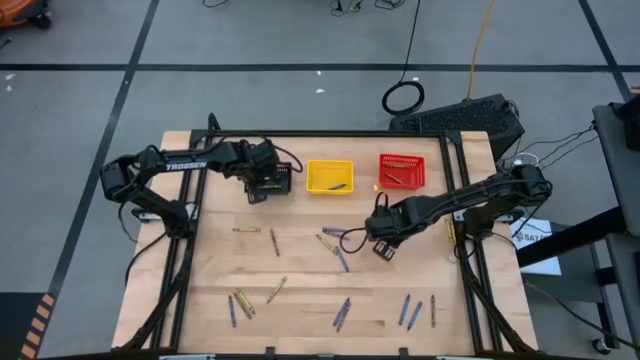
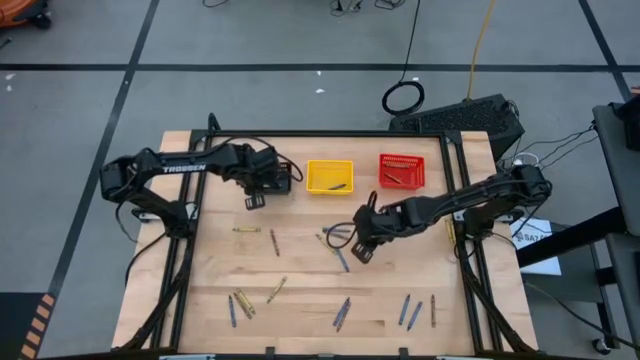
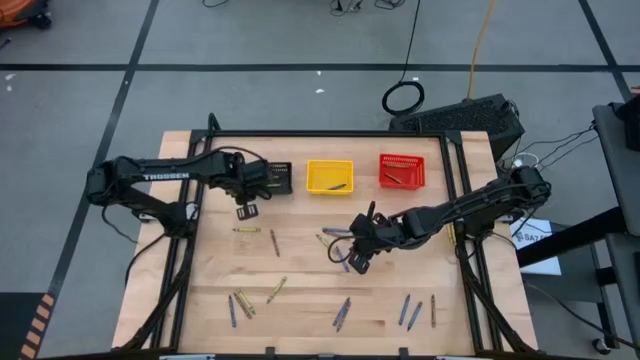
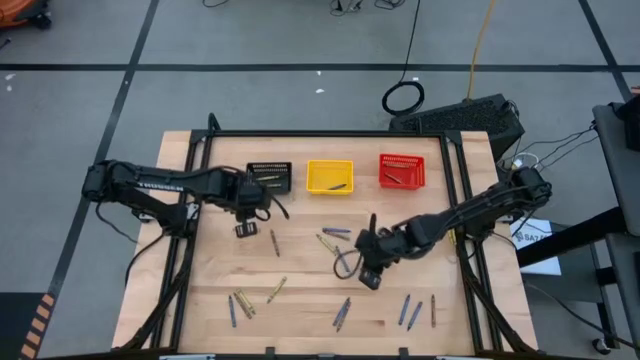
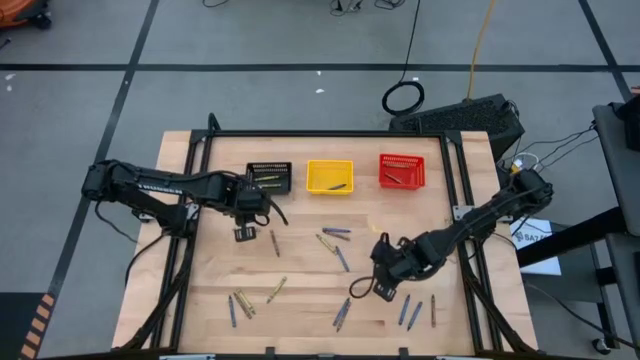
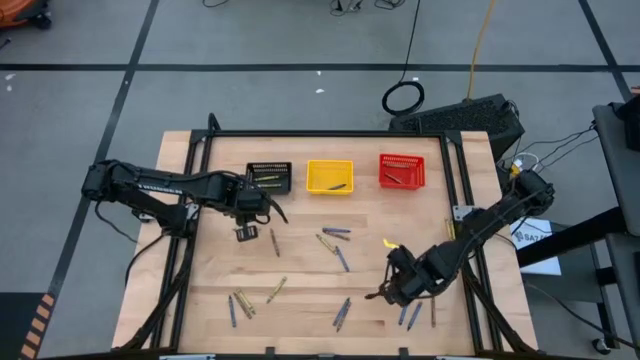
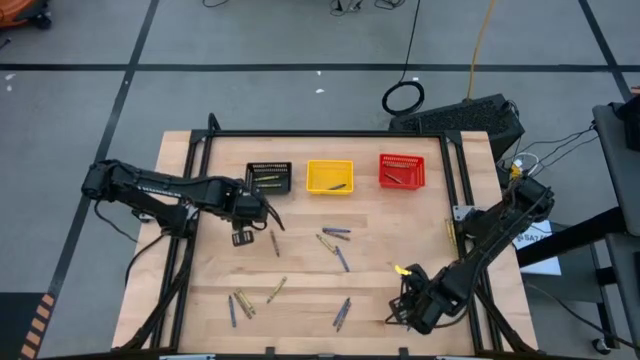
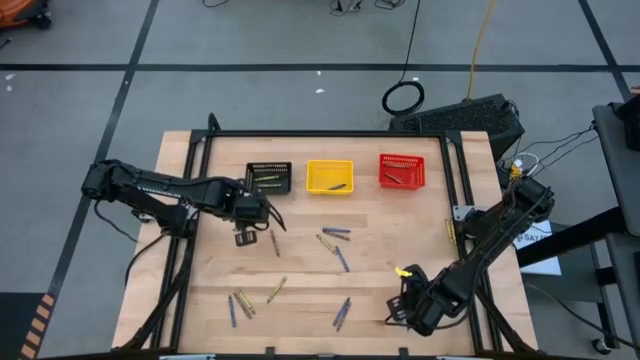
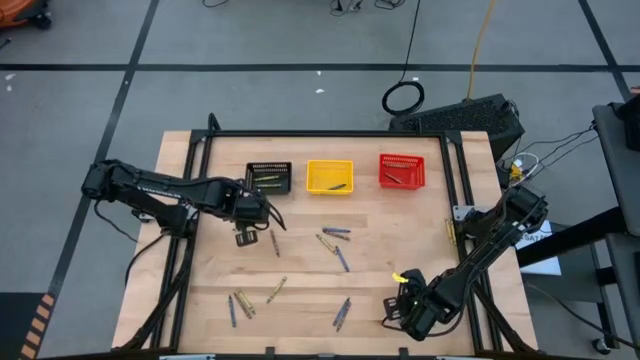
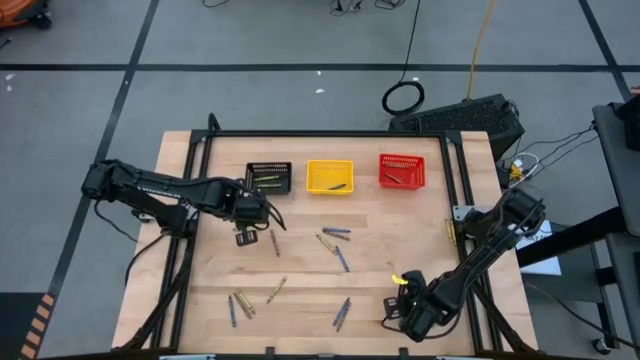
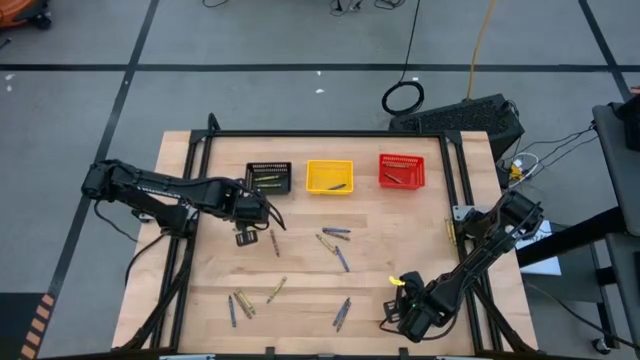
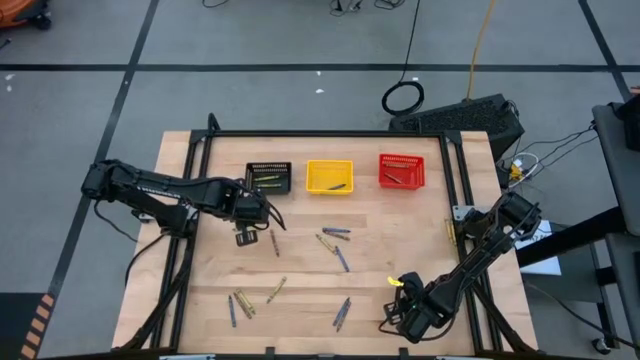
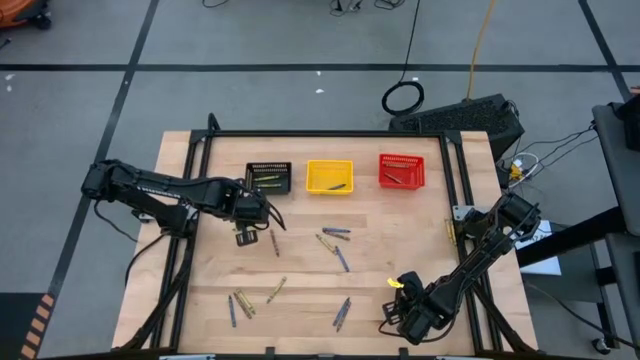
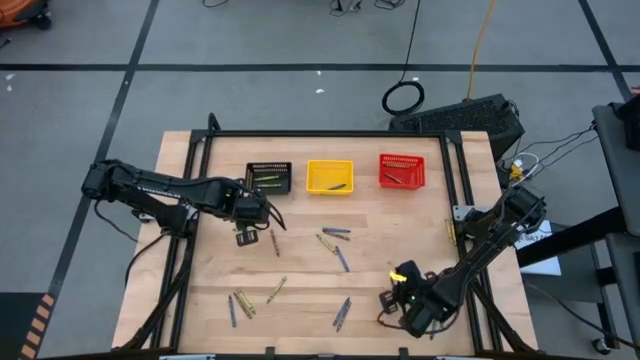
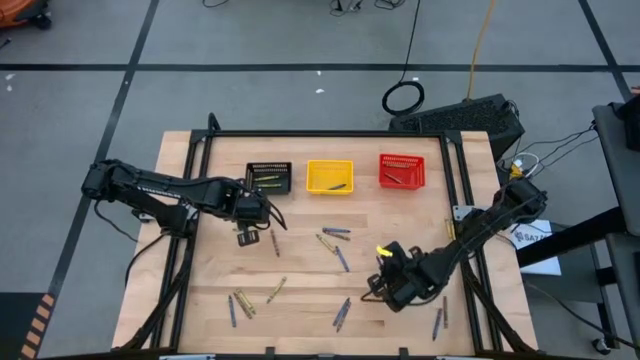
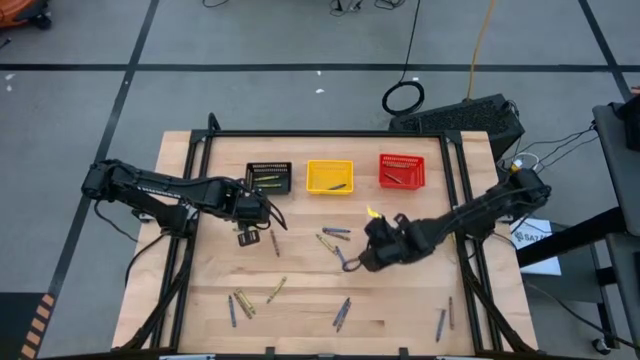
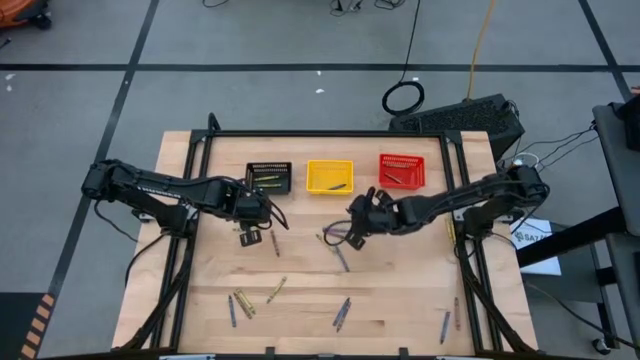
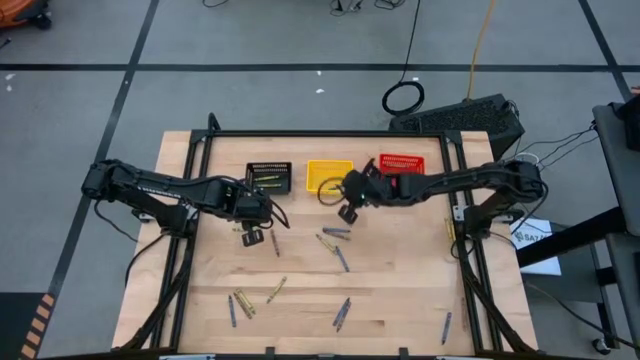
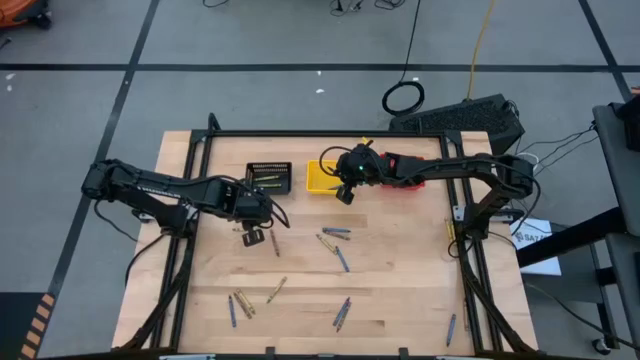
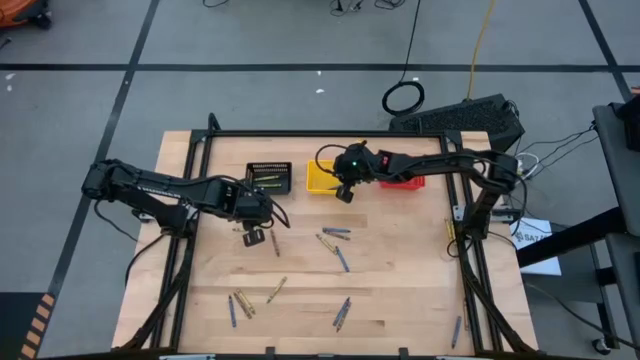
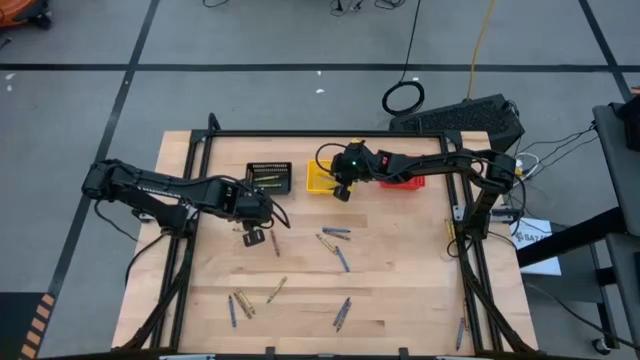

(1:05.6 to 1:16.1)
Task: Sort crayons
Put the blue crayon into the yellow bin

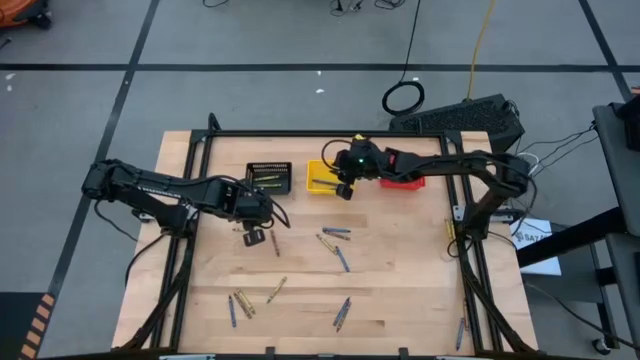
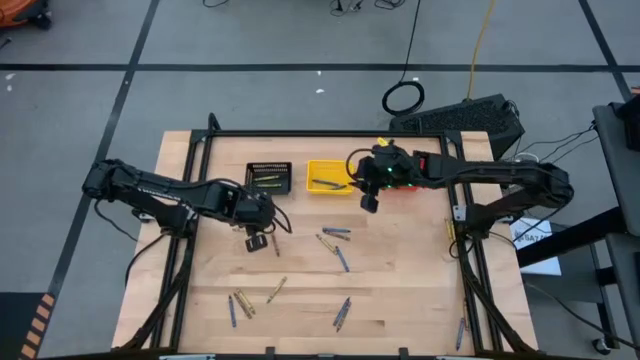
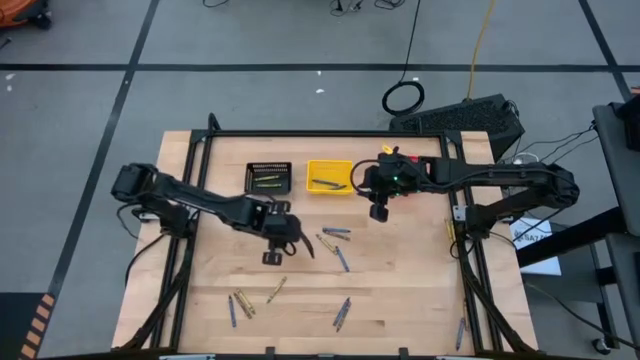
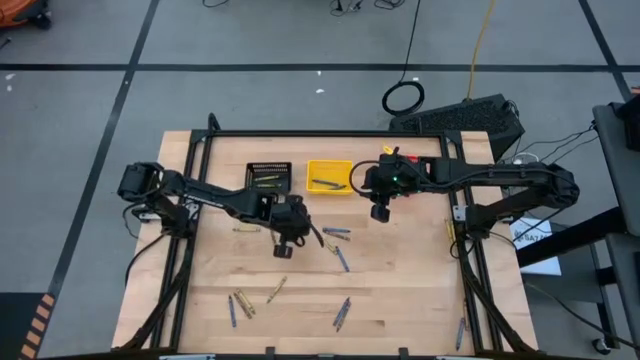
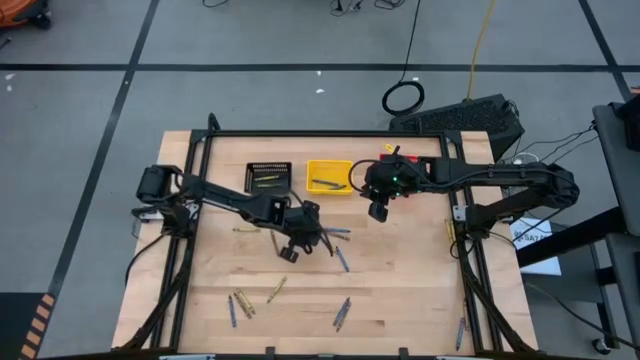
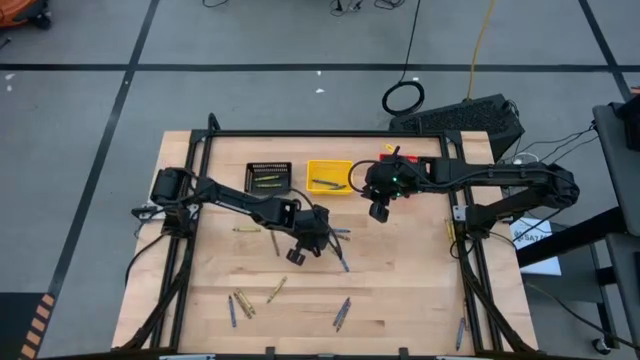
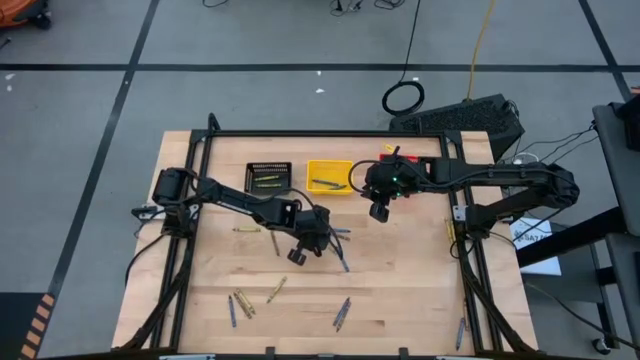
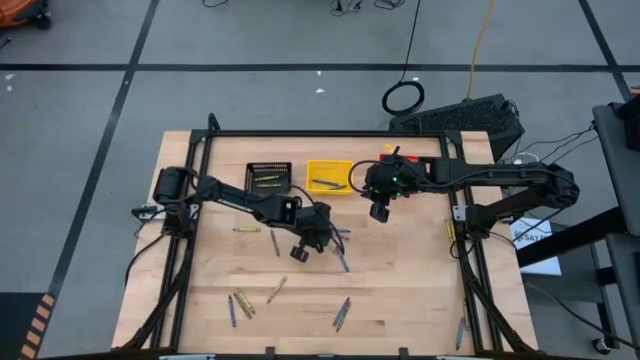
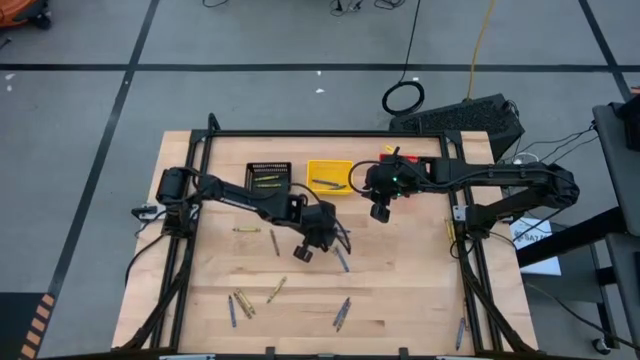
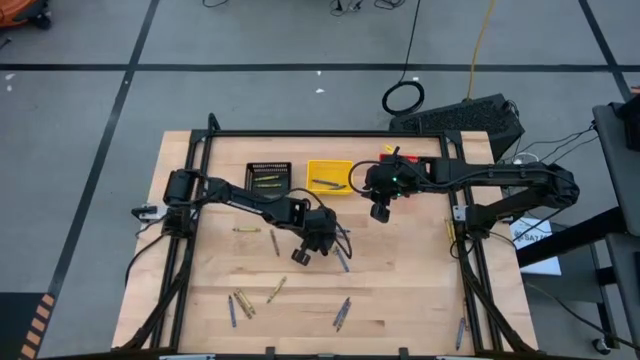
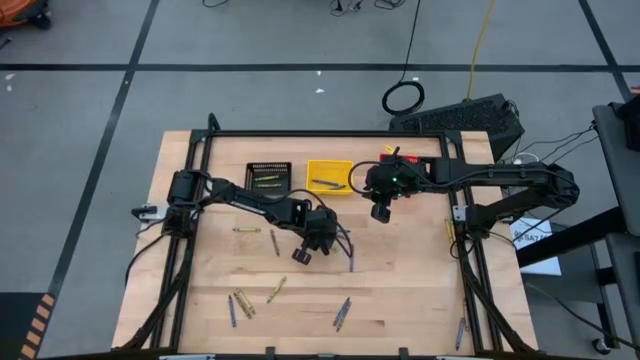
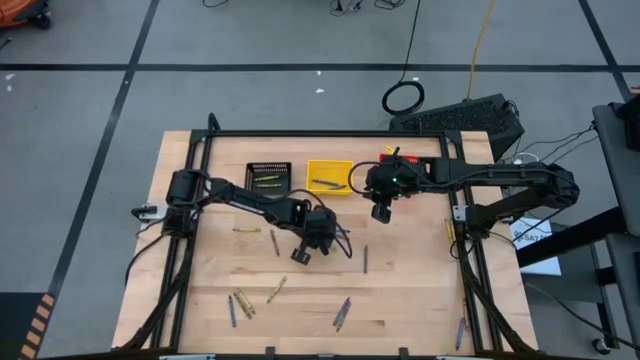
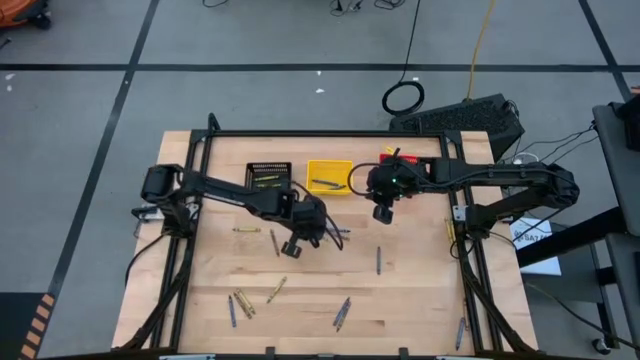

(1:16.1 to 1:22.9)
Put the green crayon into the black bin

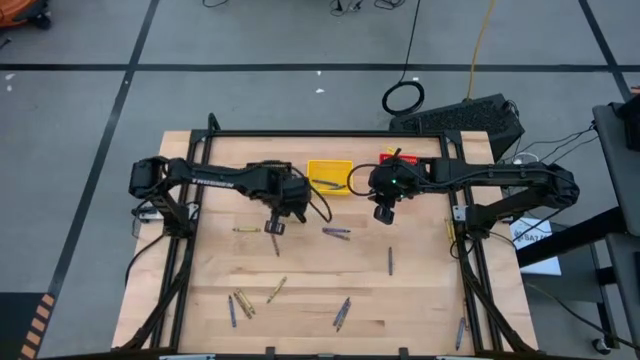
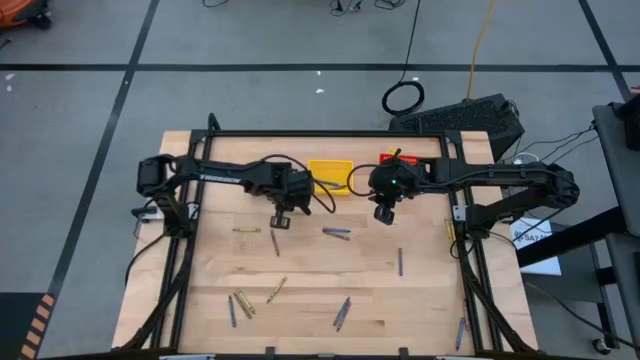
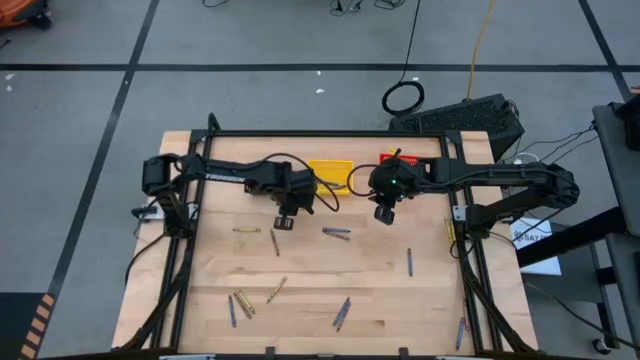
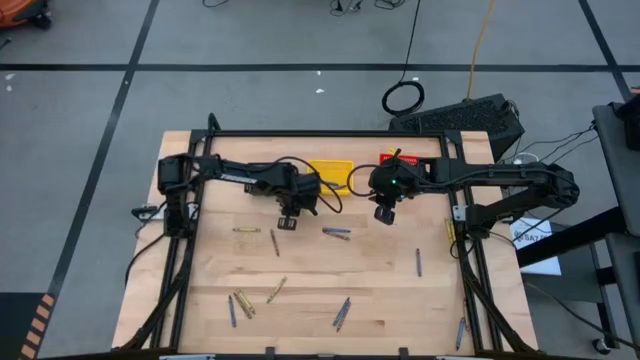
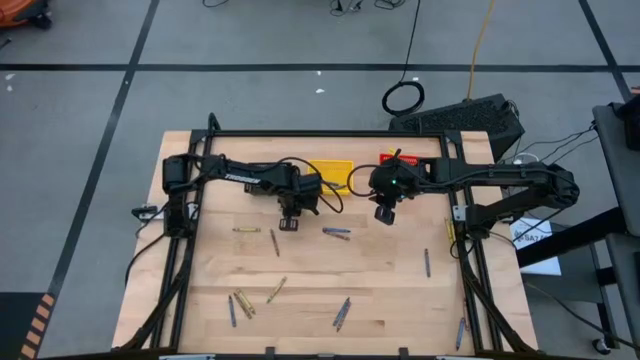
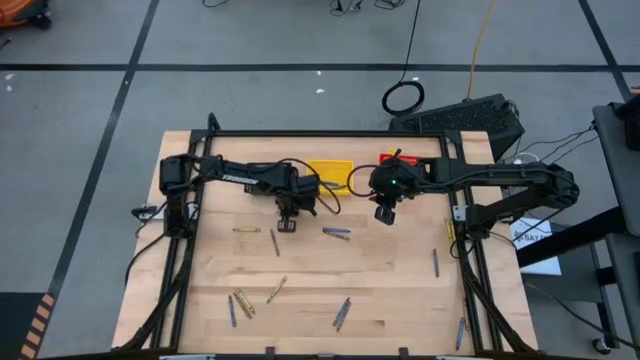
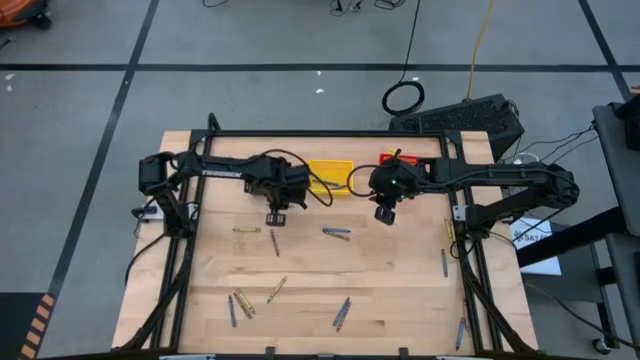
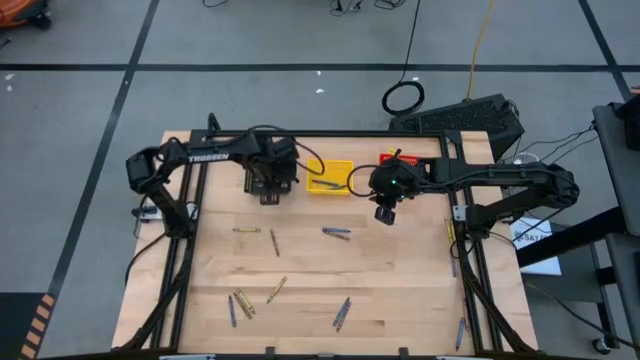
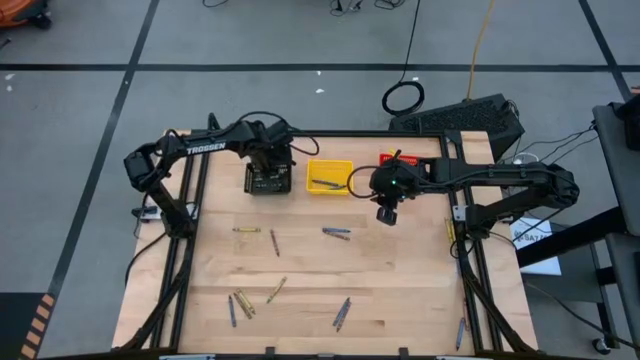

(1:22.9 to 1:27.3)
Put the green crayon into the black bin
